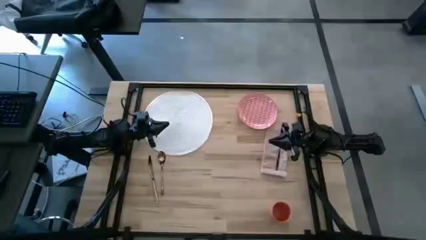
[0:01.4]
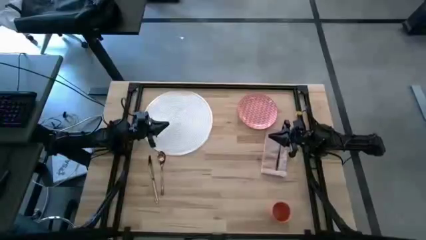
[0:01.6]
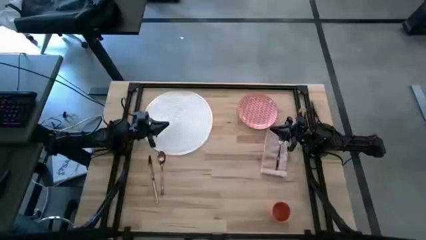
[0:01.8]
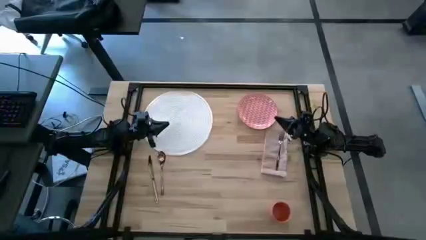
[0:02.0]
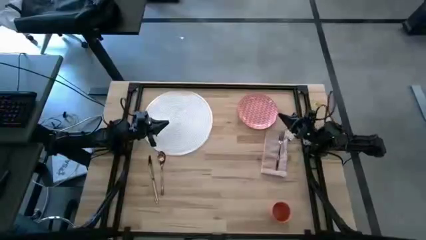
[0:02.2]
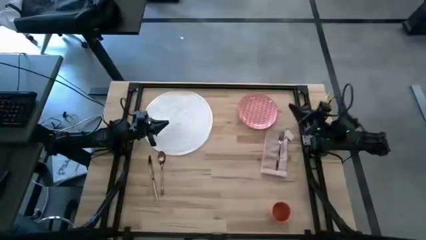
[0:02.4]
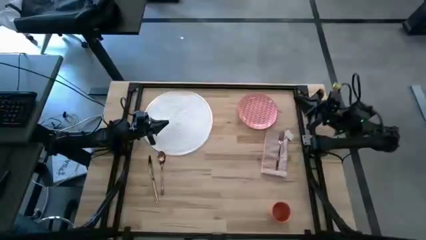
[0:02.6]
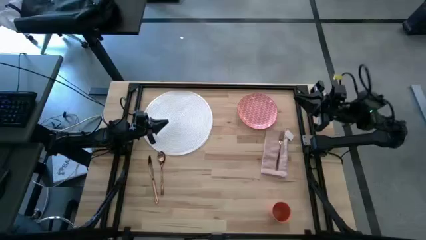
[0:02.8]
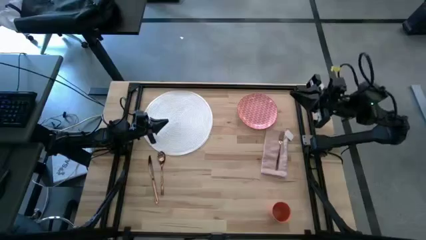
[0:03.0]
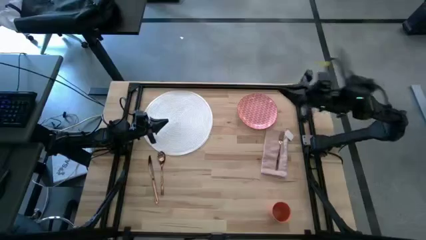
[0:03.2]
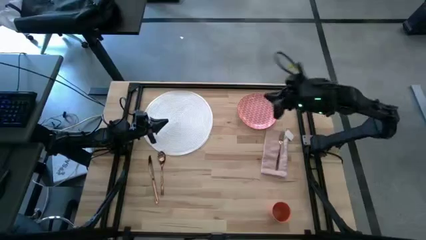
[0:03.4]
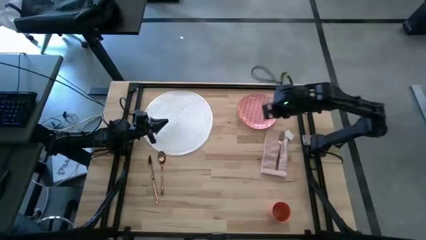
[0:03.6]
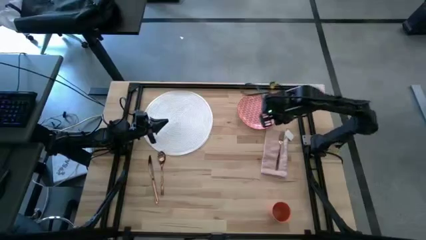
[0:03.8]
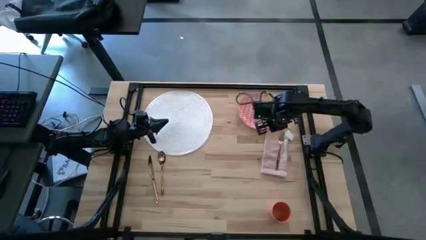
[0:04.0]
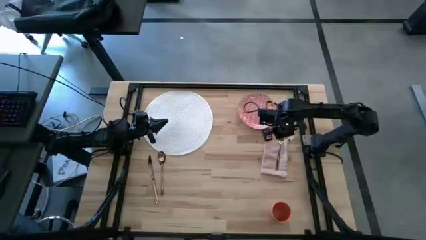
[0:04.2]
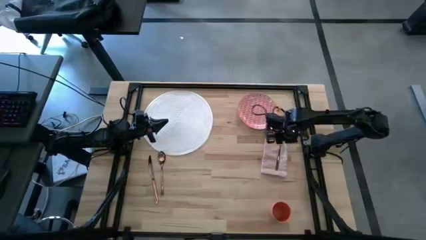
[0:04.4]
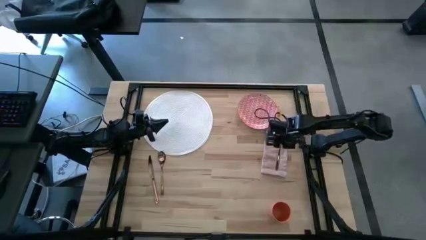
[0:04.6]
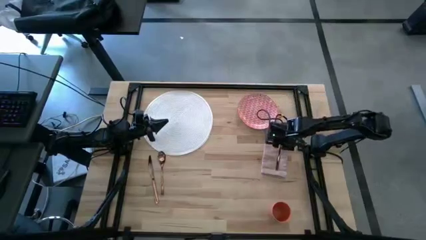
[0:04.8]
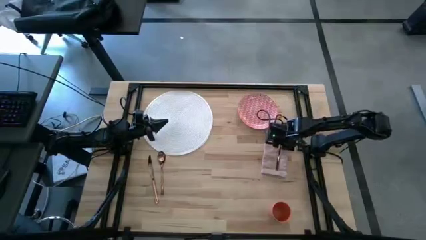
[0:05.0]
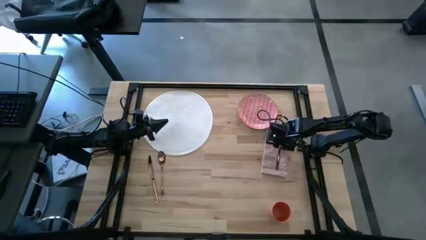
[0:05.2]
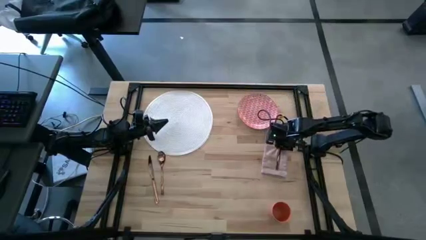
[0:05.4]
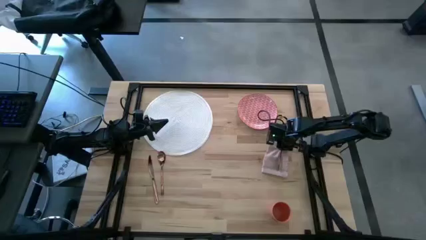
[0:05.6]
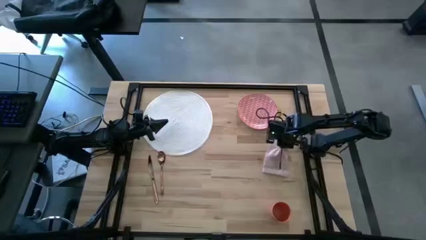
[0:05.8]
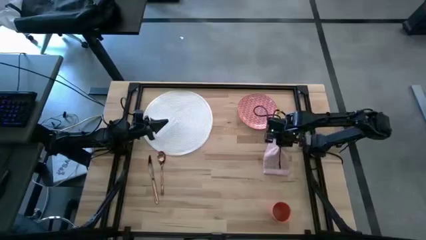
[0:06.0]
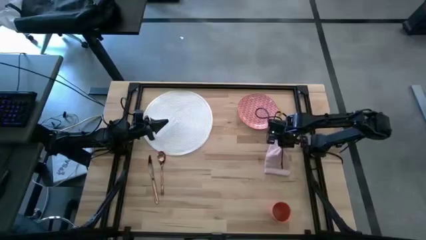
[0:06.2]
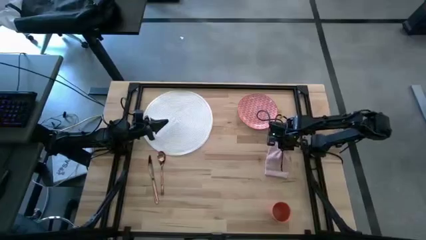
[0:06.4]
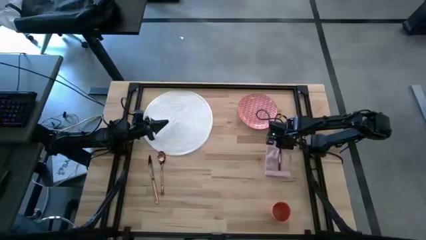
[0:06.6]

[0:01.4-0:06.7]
Task: Set table place
Move the fork beside the spoon

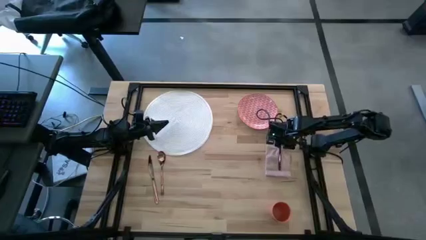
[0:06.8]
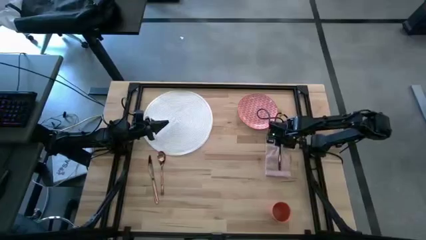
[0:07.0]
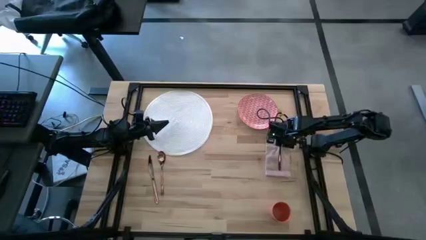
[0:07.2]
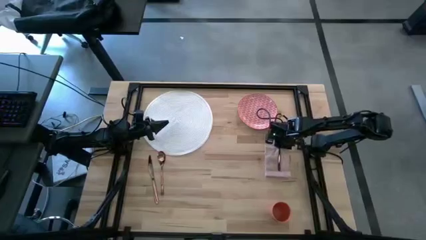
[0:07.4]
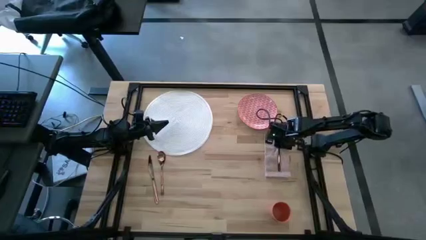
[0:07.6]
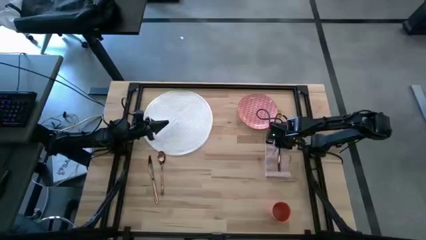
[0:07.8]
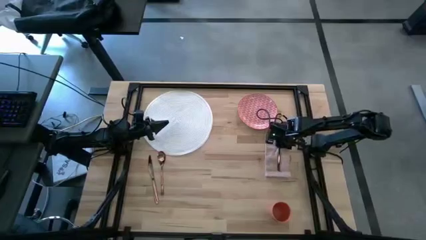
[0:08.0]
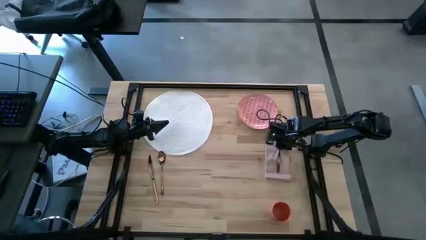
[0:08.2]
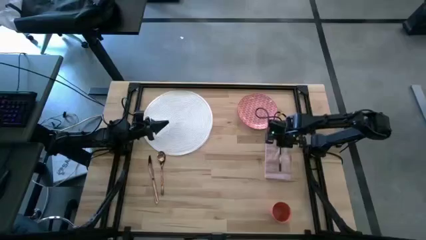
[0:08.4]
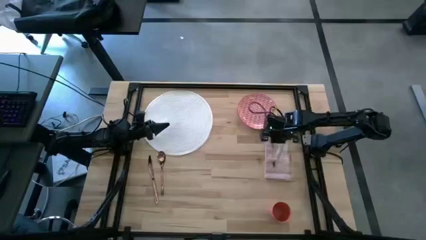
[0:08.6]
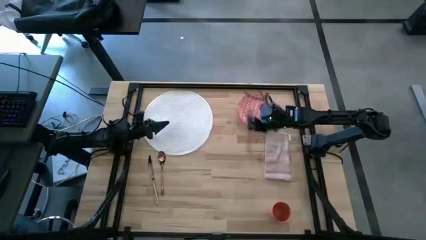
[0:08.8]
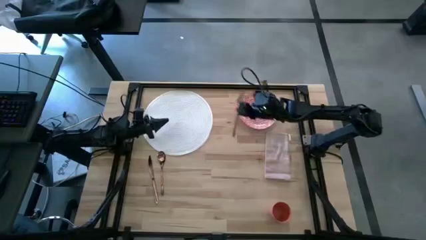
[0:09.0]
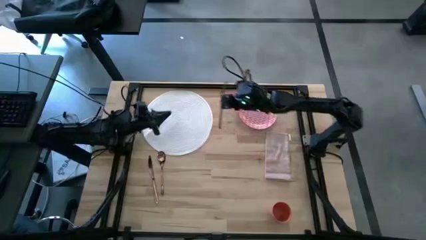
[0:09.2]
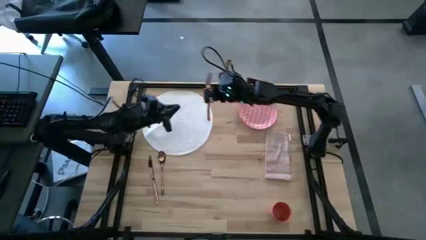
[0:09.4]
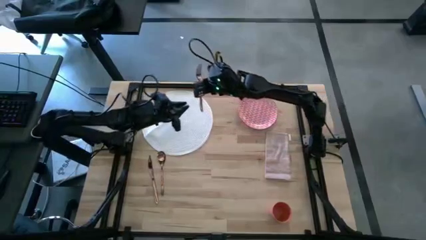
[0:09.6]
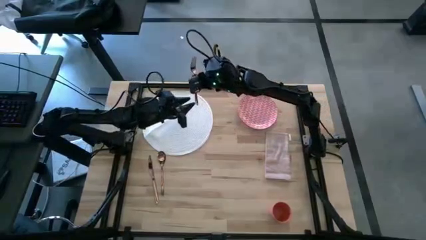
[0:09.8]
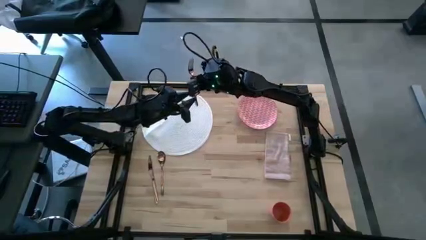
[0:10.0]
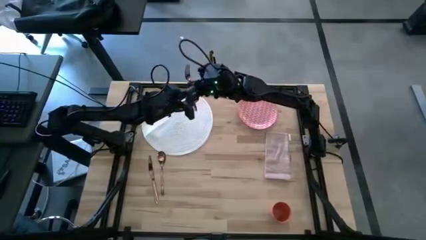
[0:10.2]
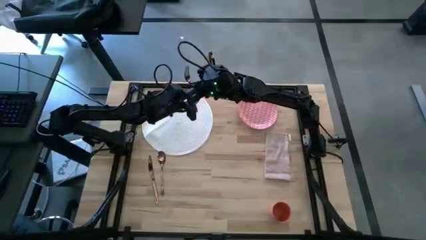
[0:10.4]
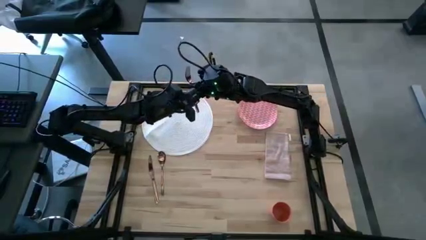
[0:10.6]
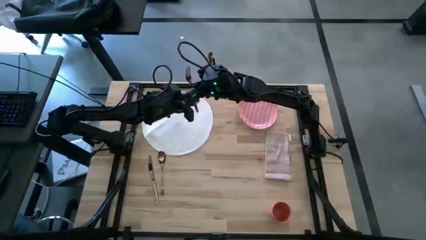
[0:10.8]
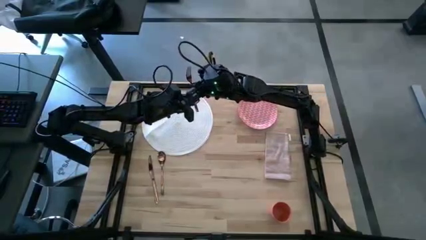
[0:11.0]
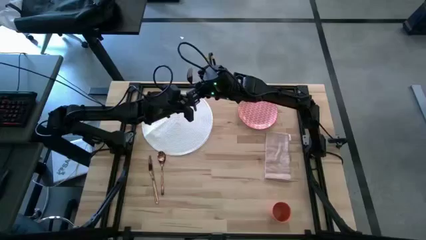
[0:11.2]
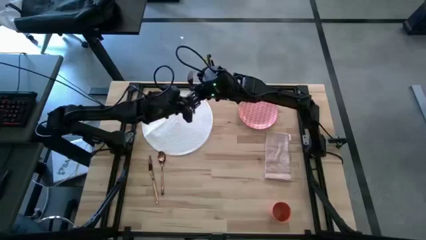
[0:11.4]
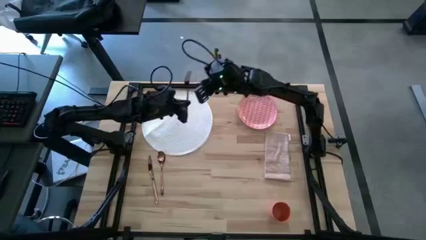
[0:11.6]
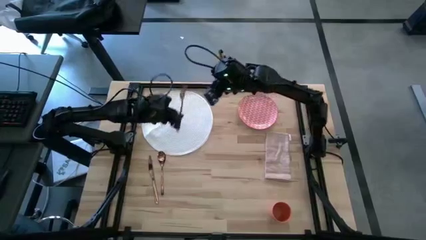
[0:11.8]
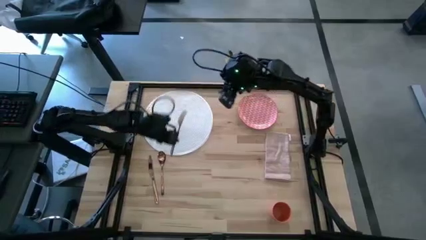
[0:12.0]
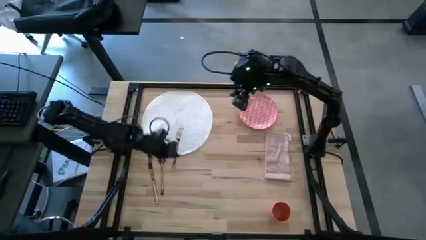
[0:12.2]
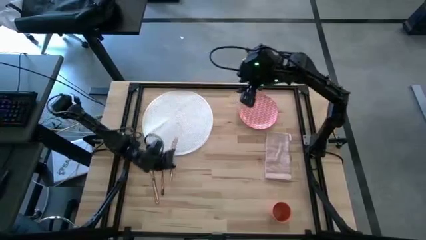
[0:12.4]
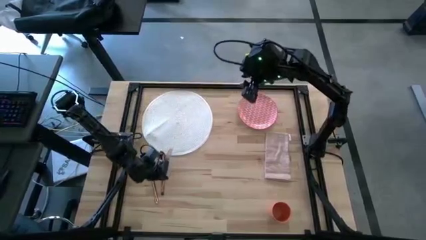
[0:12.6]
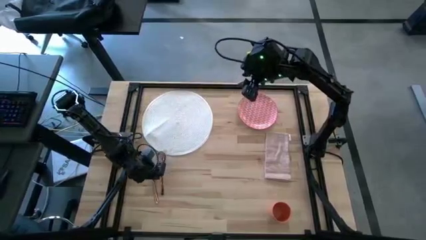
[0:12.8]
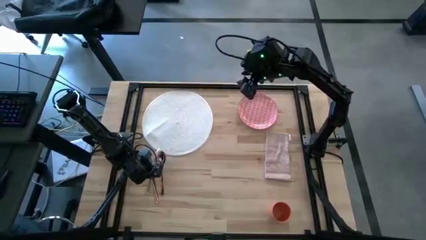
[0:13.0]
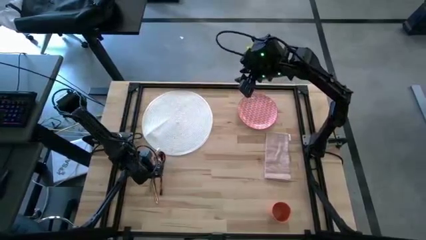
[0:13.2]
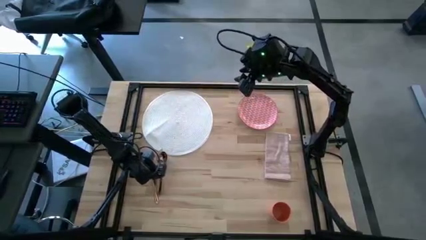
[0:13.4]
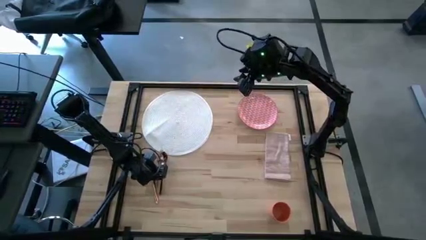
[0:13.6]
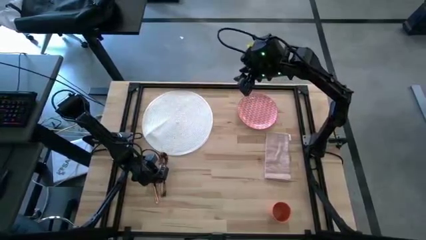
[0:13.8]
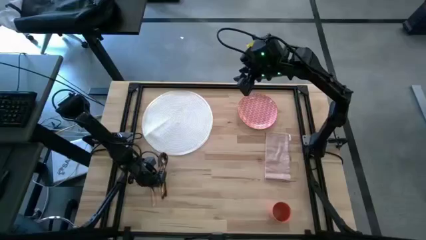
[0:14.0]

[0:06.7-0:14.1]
Move the fork beside the spoon

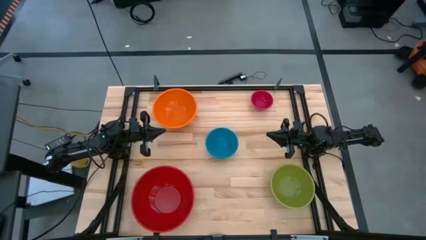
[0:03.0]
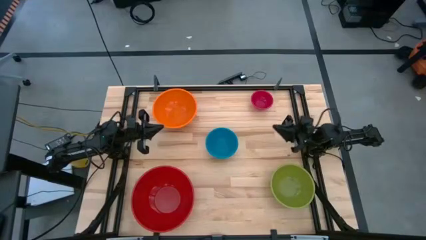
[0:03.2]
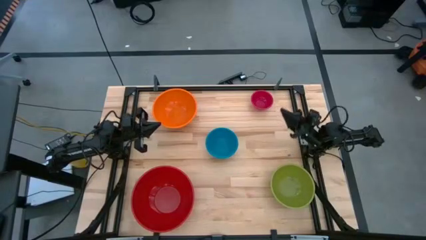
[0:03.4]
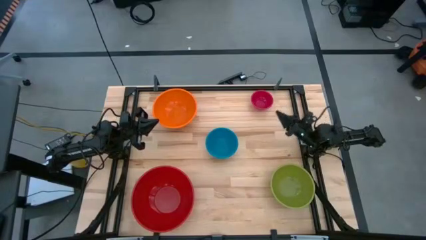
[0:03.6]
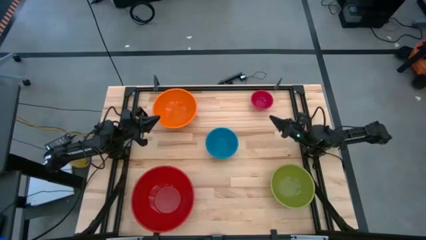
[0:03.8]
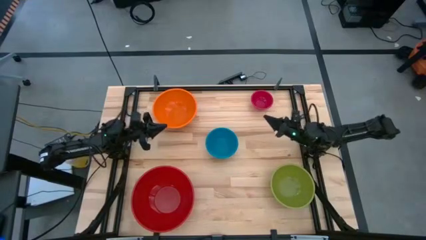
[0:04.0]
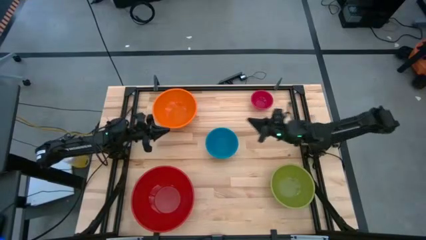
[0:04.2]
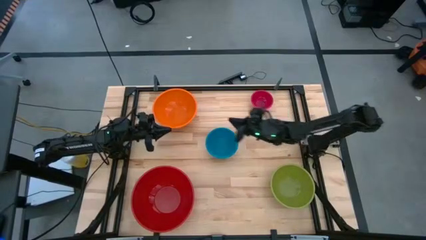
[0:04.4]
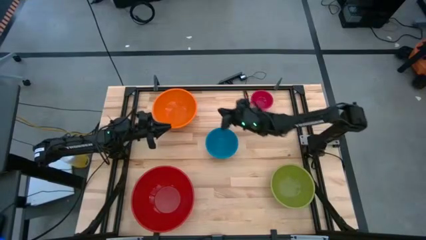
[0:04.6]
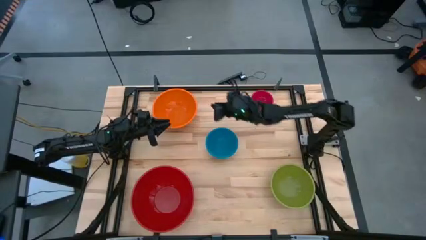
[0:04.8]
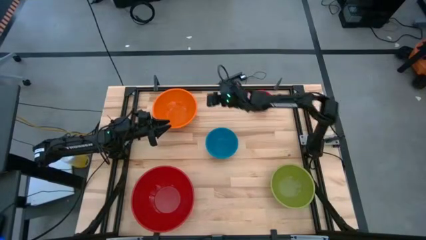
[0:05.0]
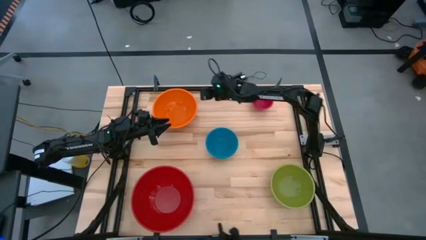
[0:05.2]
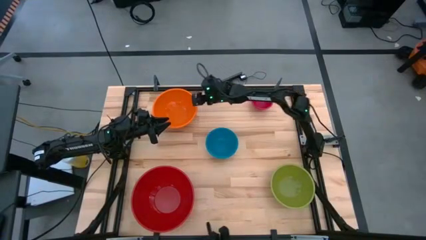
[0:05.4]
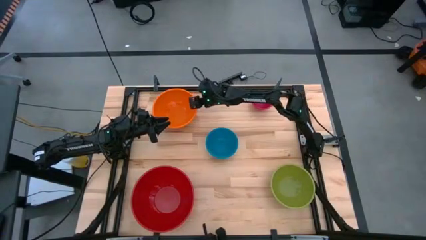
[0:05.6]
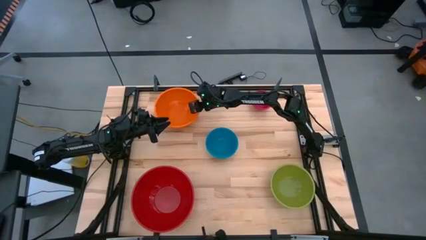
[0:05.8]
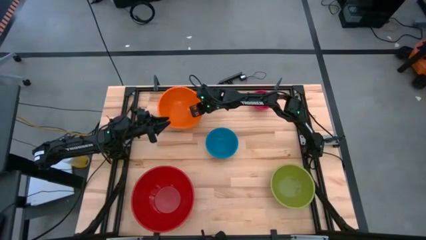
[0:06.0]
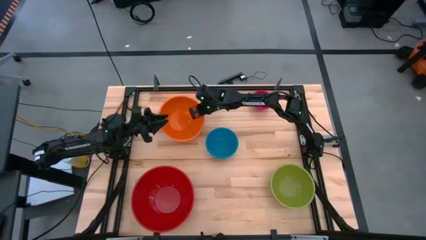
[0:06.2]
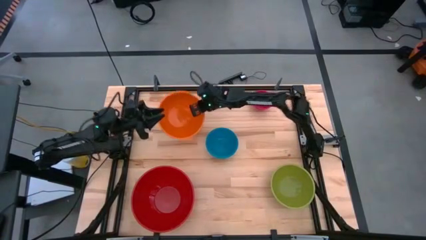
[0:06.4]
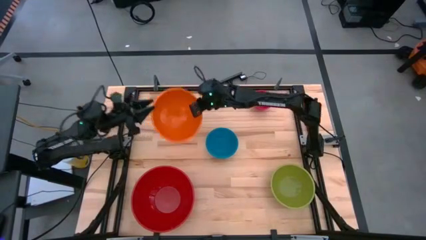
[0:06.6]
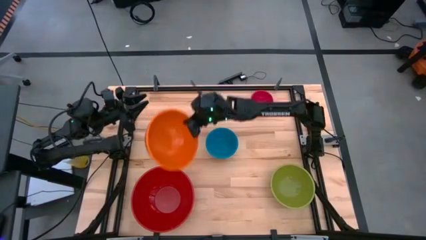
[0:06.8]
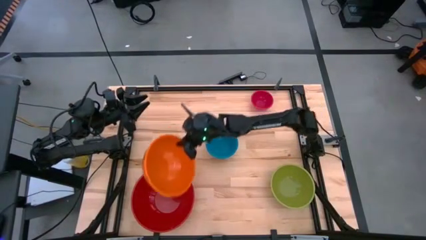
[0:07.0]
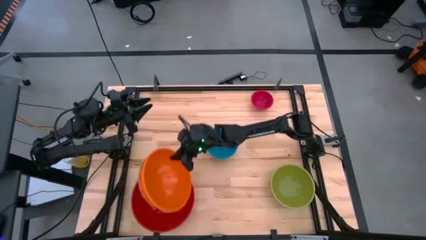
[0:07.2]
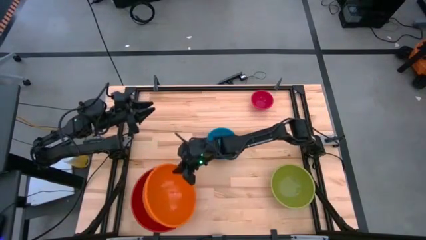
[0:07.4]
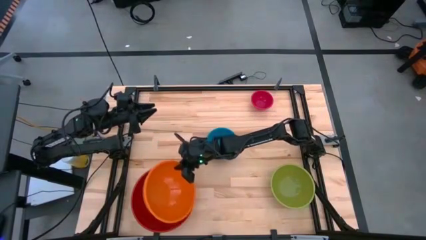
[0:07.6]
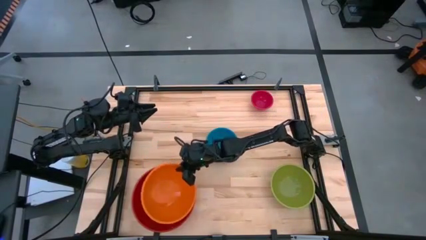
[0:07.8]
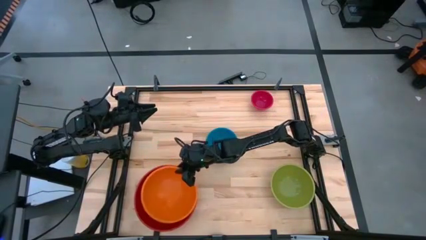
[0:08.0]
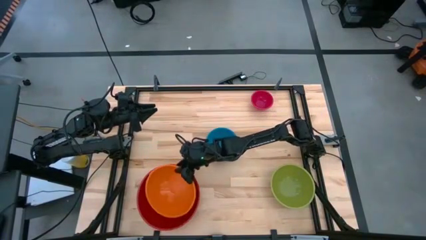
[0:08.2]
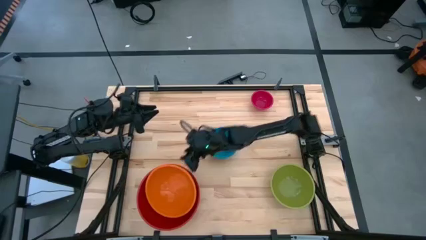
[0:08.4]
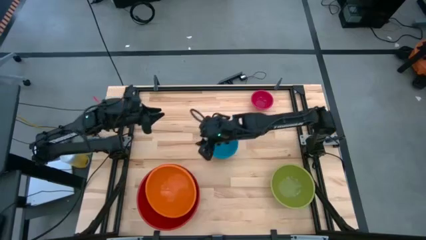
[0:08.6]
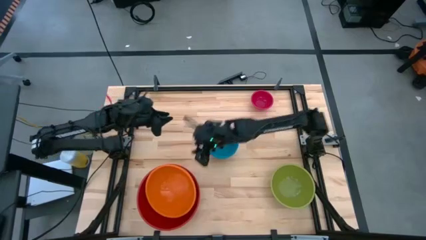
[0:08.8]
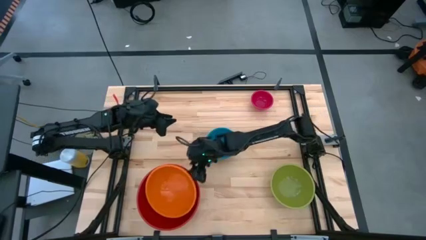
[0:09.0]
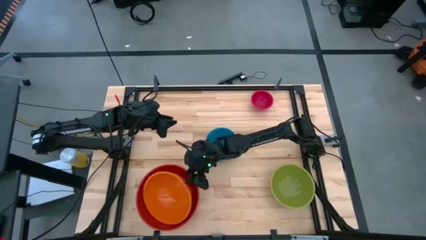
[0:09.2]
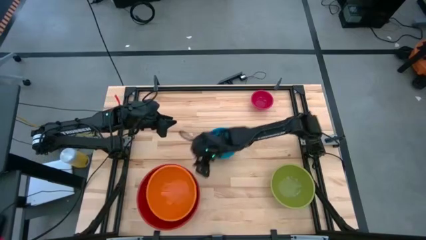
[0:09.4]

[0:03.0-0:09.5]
Task: Nest bowls inside each other by size order
Stack the orange bowl on top of the red bowl
